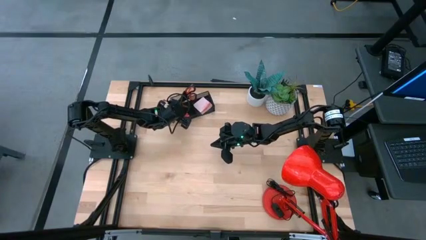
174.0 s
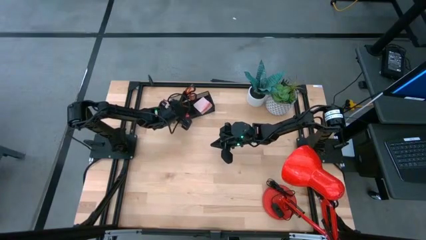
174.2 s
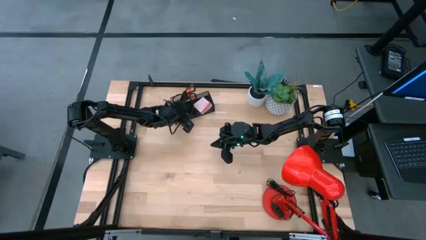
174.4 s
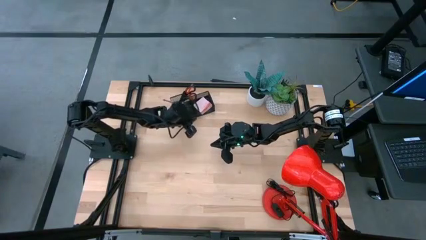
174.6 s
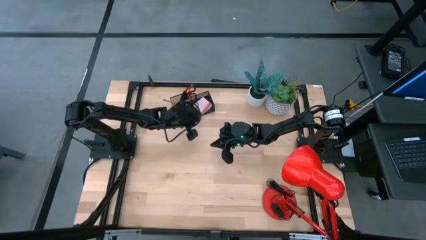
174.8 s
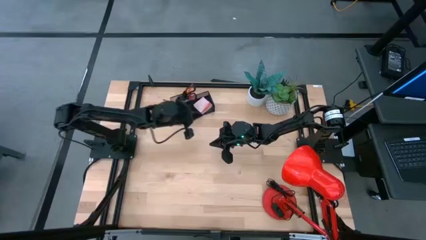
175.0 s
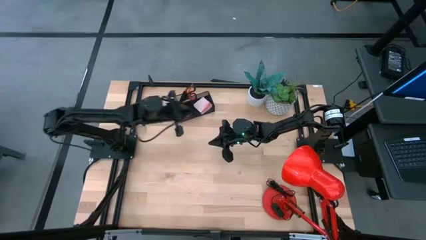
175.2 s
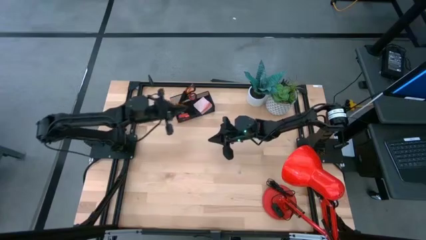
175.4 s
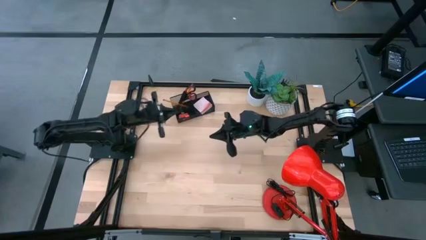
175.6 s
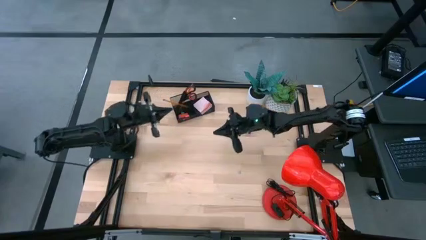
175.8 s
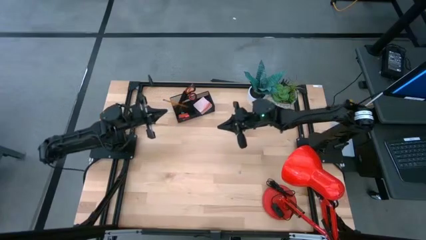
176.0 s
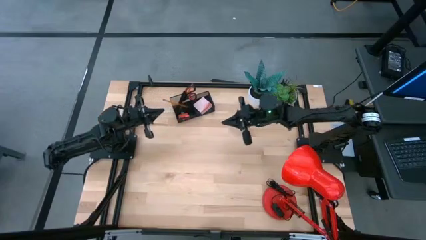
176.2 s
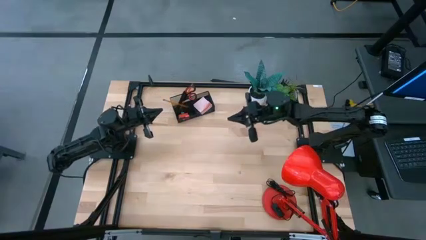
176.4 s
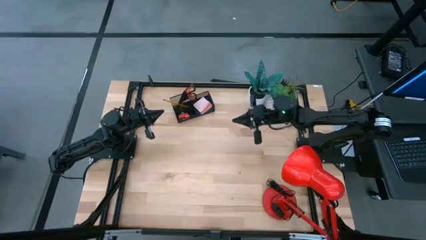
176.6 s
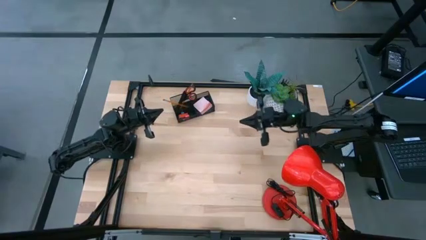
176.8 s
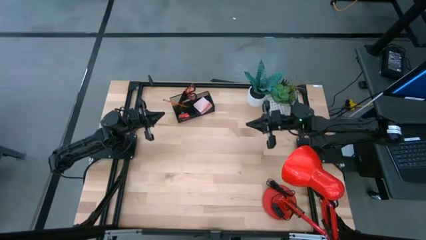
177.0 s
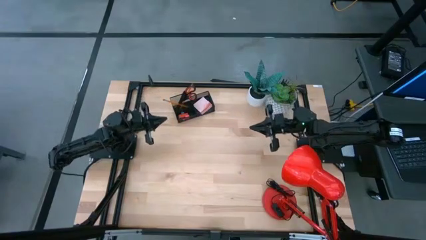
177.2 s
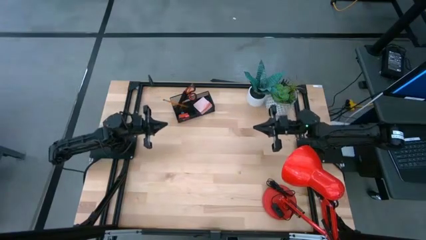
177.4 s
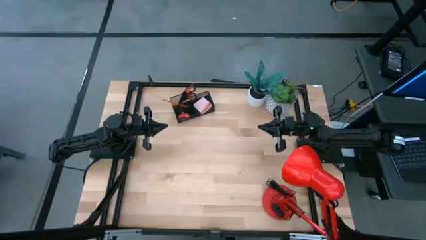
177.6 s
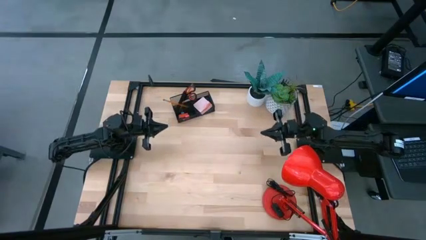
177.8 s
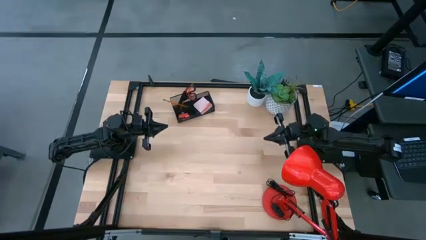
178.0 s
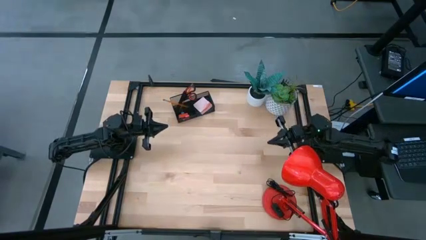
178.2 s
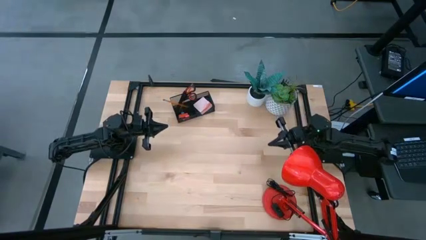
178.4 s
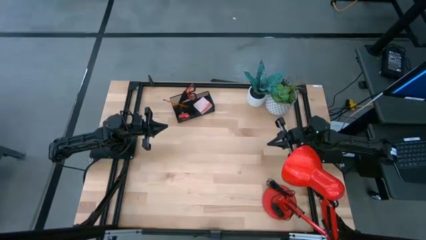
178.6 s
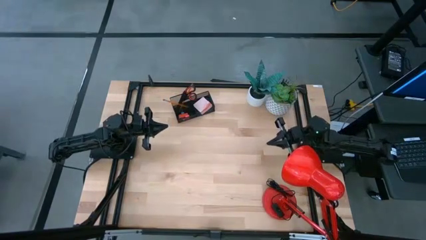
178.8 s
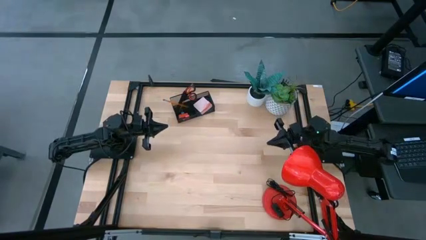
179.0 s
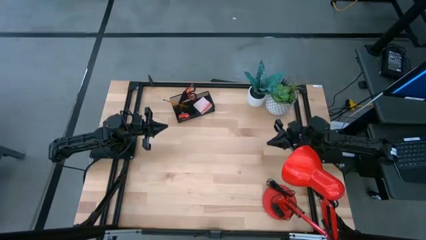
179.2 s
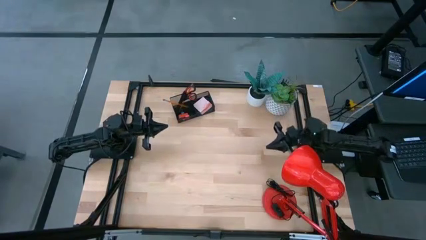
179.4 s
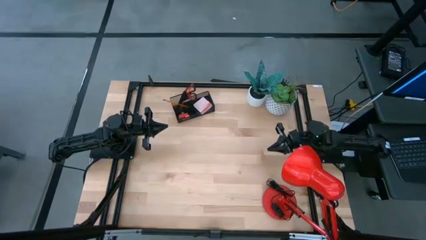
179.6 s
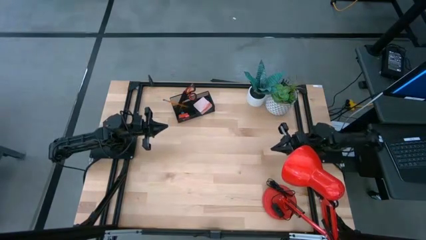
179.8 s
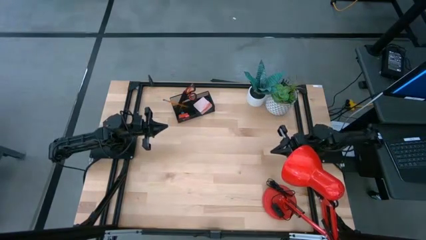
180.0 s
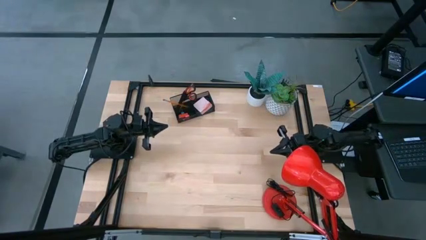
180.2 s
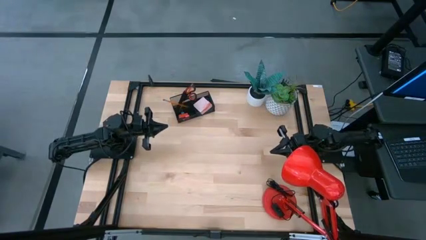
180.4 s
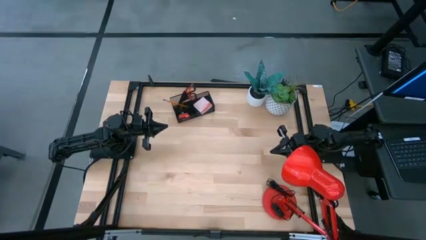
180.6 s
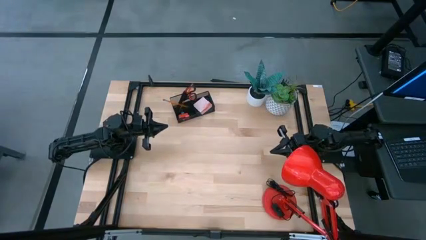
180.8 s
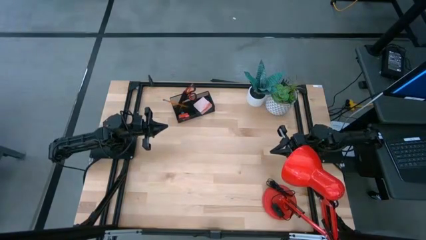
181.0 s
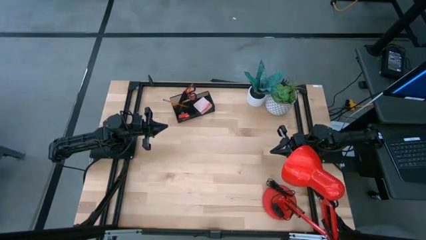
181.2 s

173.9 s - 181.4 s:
Task: Pick and place office supplies into organizer
Return to Home Position

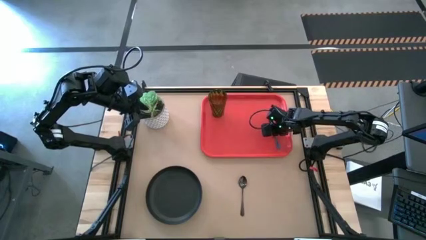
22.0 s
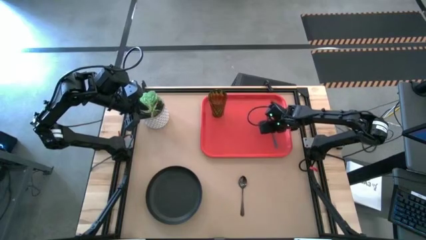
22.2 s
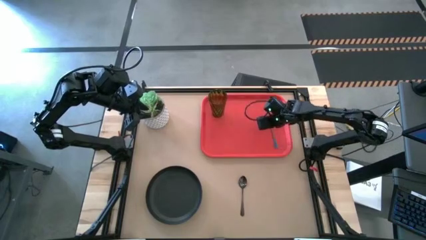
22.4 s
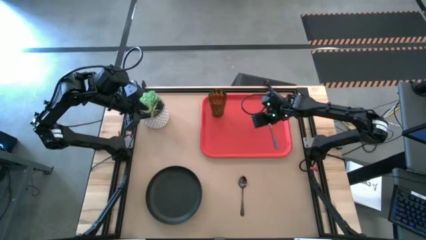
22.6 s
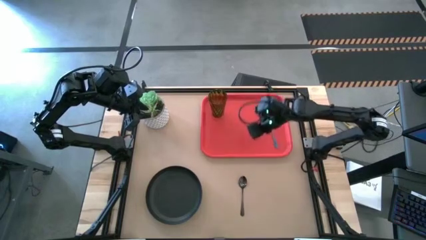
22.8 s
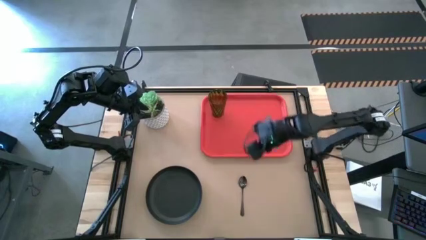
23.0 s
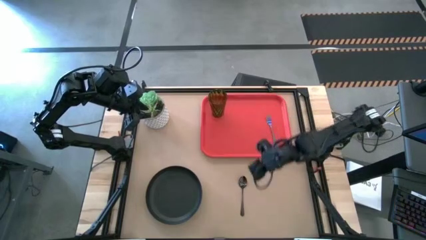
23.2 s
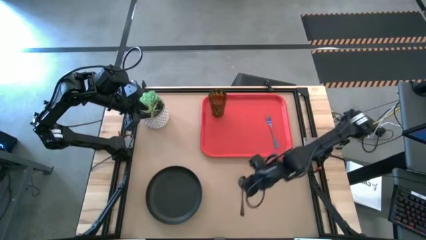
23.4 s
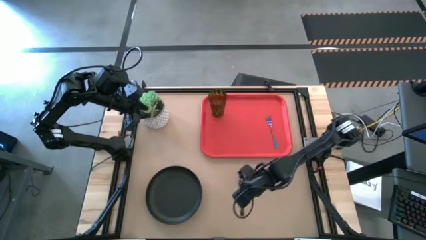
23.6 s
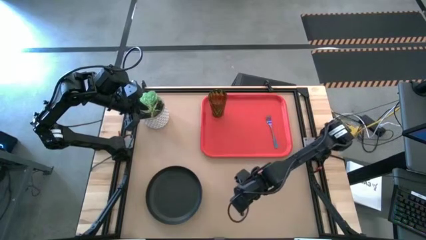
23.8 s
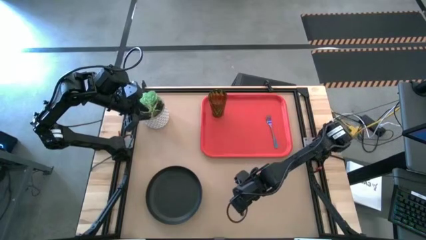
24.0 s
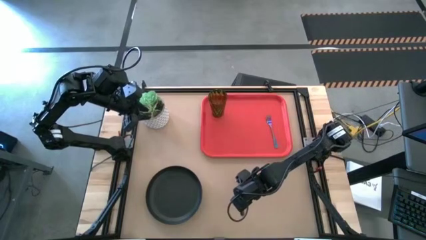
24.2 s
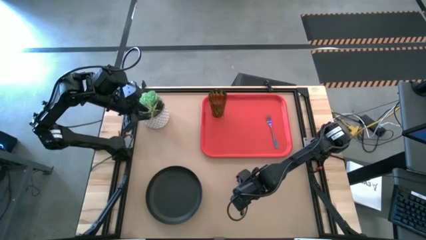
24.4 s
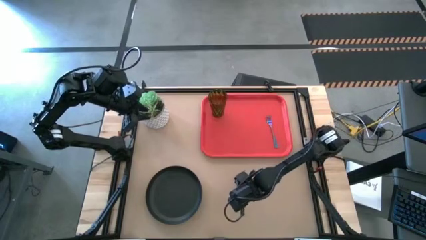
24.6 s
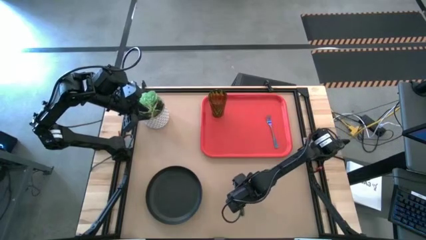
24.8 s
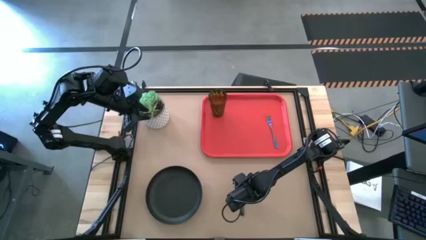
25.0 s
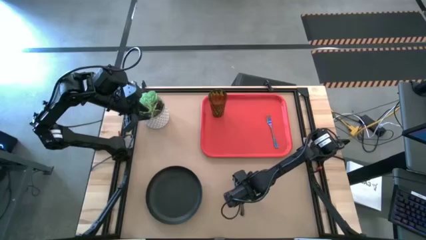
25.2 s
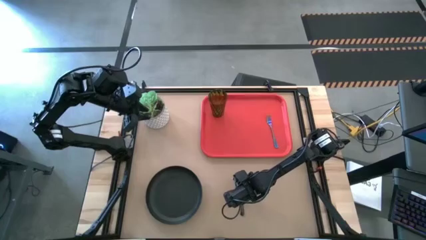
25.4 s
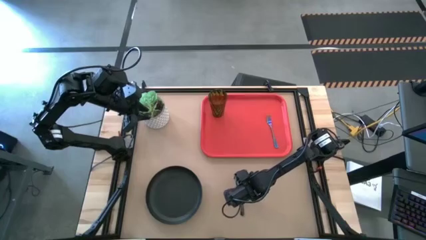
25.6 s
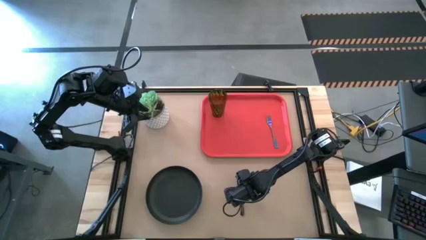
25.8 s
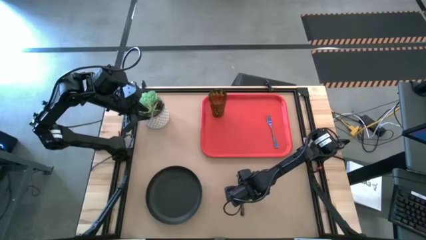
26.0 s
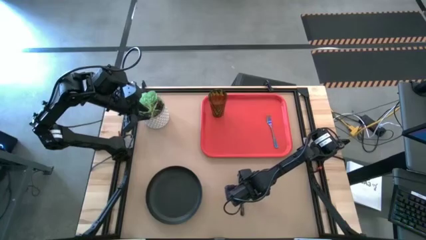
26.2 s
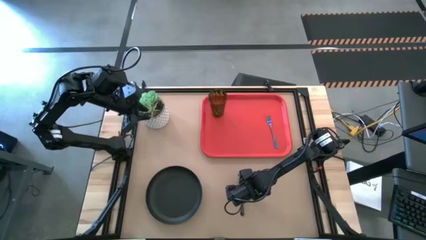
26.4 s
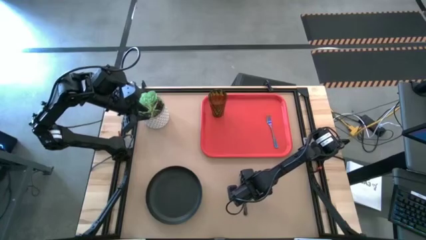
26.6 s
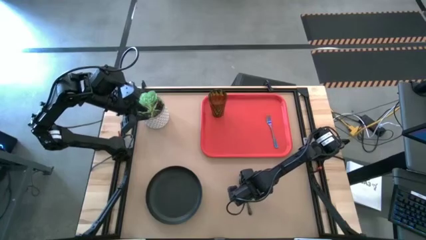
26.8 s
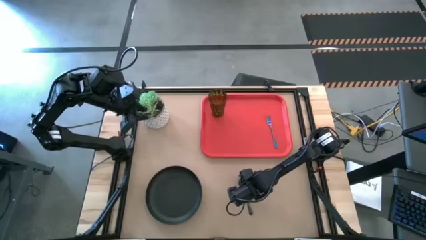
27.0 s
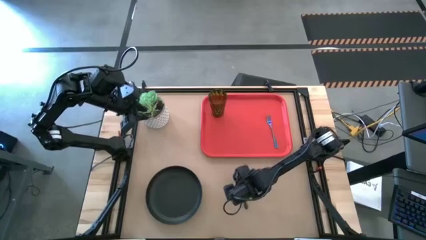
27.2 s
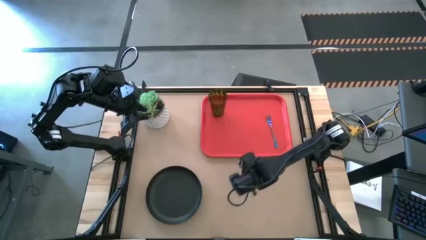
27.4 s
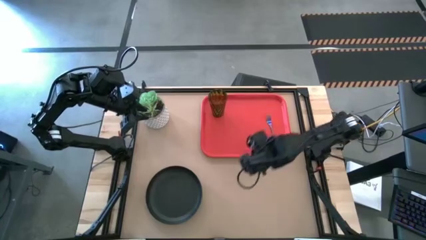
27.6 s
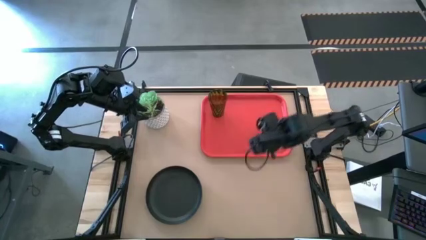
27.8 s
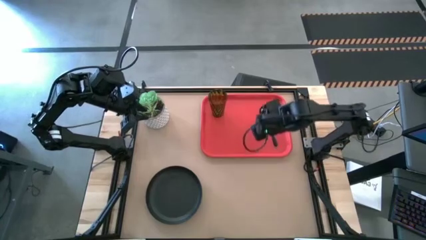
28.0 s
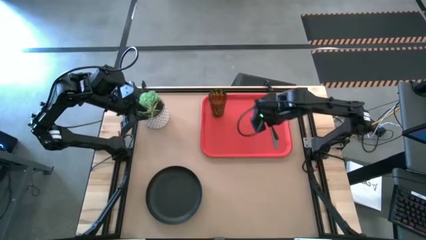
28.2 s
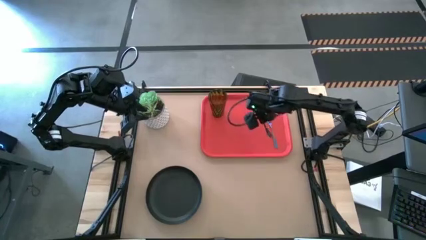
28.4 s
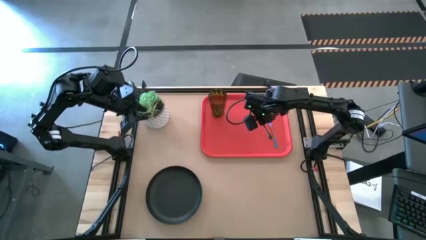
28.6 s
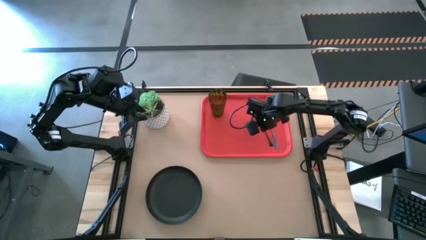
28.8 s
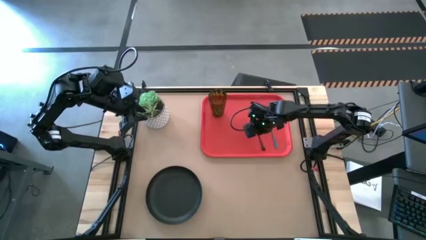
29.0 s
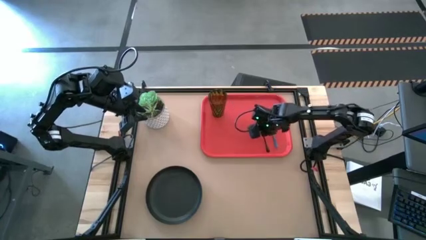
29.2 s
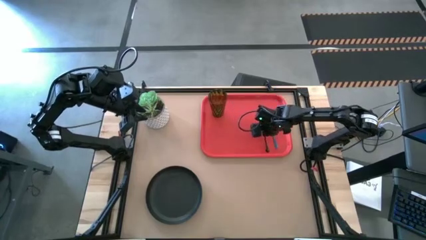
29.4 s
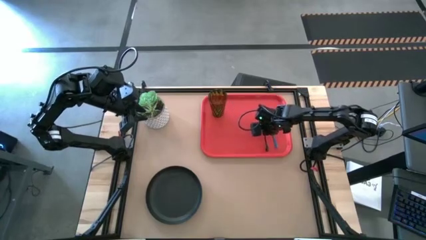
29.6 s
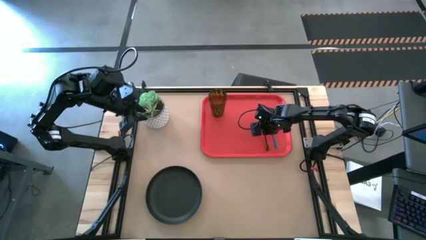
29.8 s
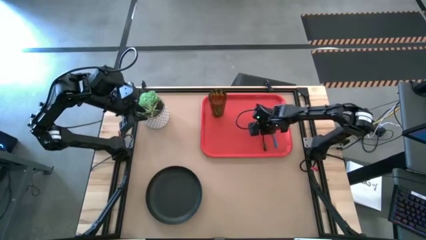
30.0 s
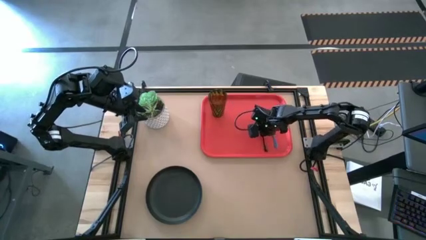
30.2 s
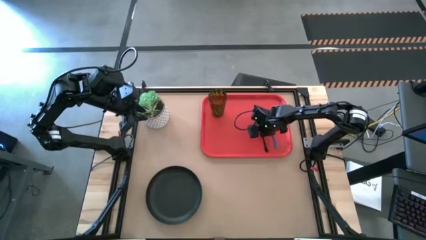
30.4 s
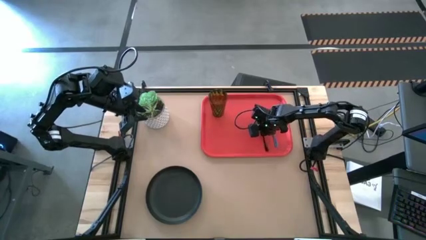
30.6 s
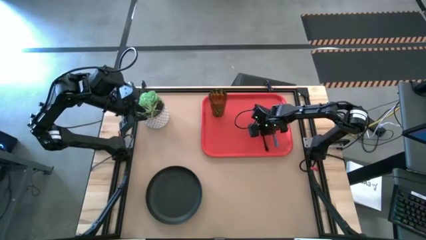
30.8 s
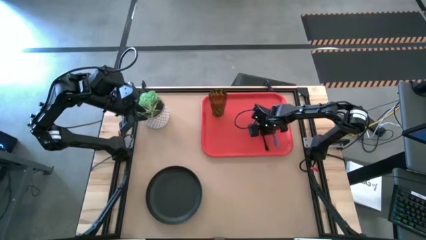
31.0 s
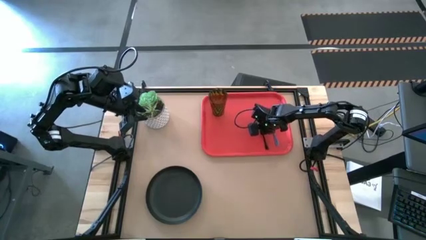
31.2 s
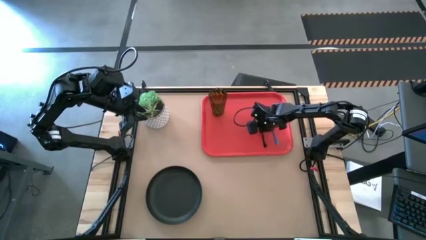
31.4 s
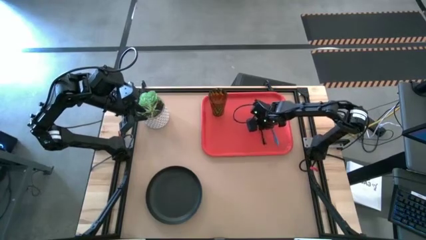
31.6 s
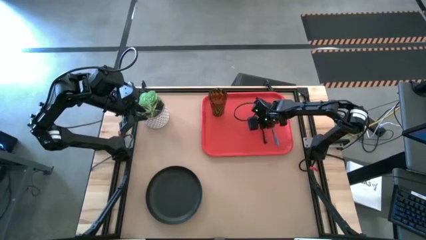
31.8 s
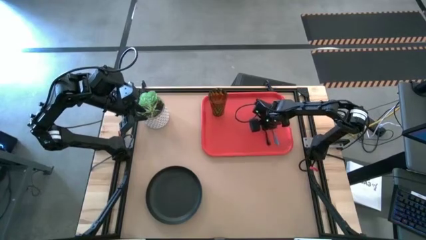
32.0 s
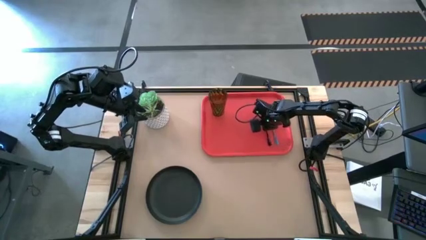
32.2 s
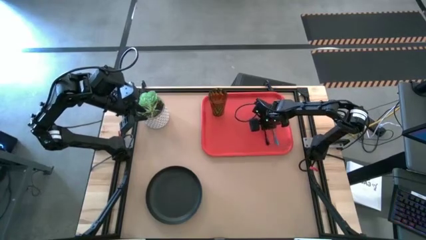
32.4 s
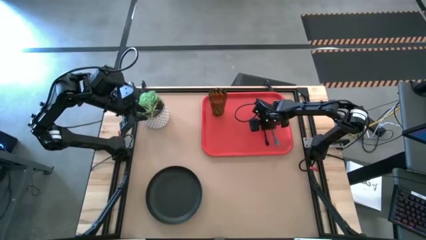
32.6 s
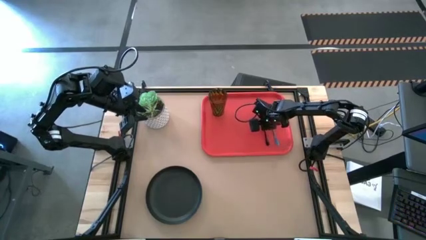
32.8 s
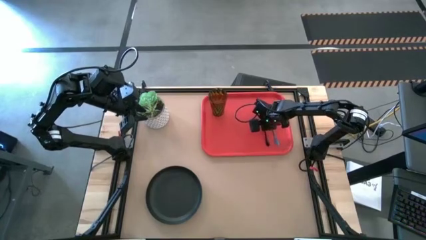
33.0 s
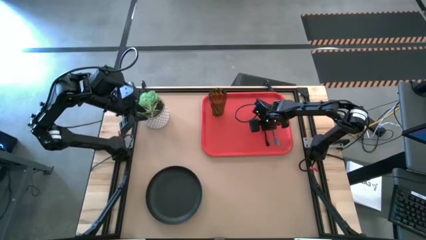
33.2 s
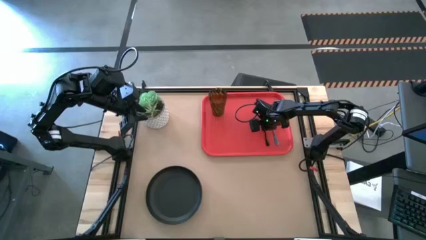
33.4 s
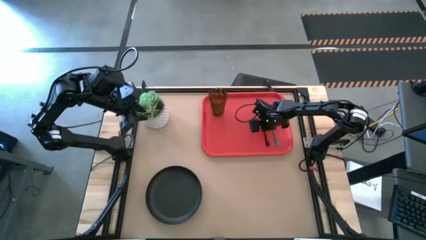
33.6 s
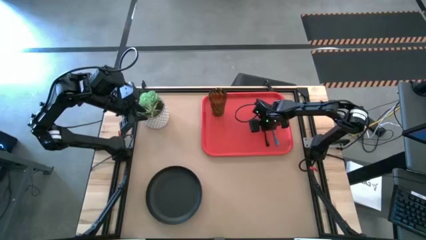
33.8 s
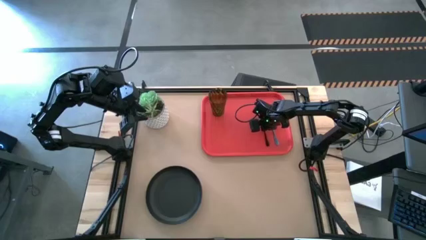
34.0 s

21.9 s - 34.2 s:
Task: Pick and place plate/cup/fork/spoon on tray
Put the black spoon to the left of the blue fork on the blue tray
